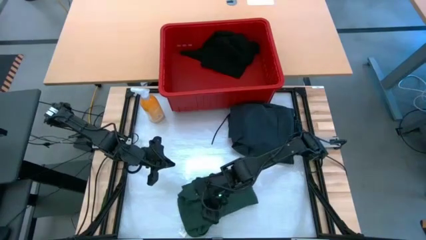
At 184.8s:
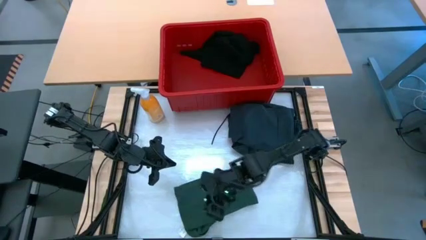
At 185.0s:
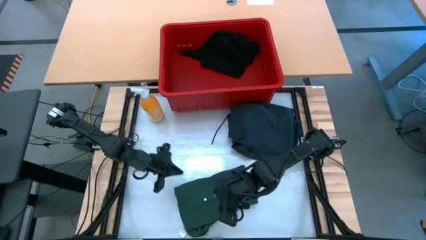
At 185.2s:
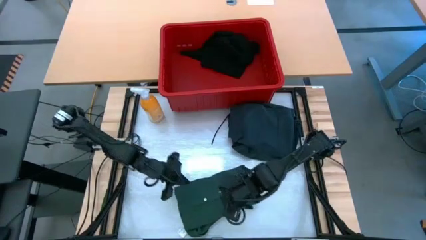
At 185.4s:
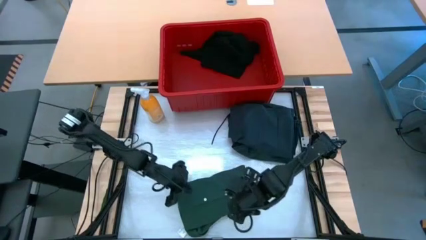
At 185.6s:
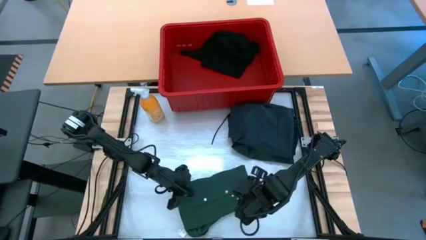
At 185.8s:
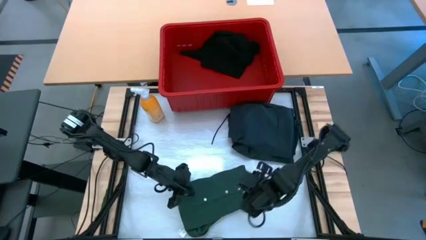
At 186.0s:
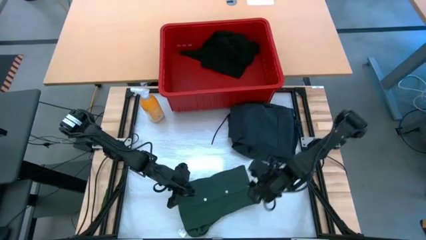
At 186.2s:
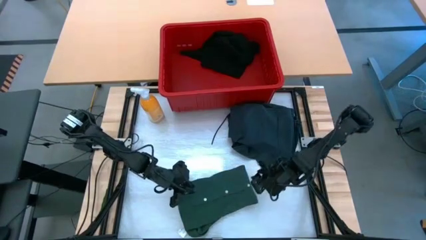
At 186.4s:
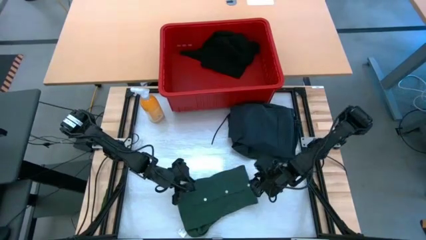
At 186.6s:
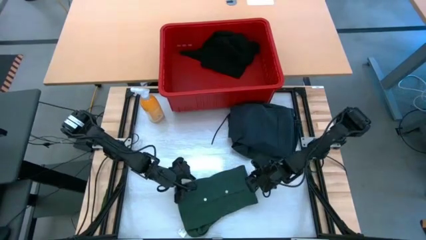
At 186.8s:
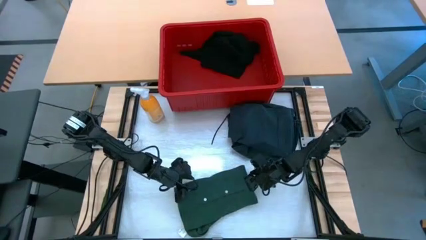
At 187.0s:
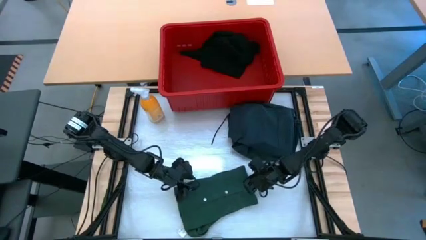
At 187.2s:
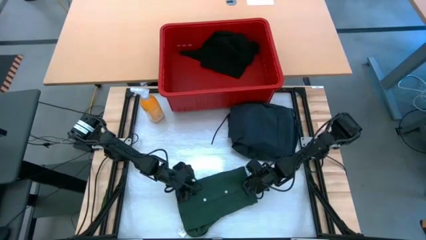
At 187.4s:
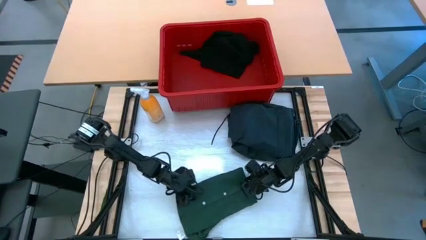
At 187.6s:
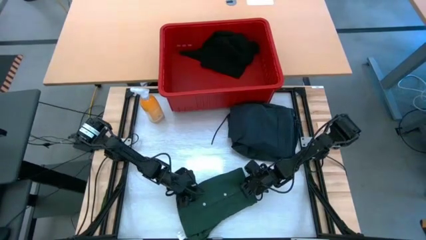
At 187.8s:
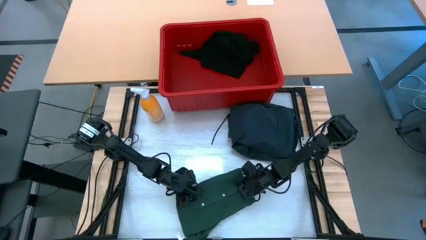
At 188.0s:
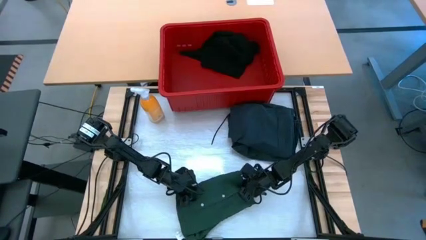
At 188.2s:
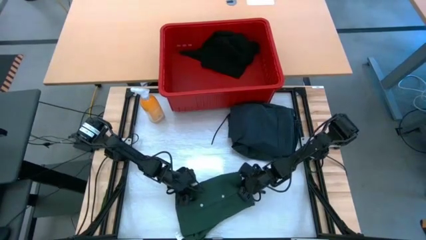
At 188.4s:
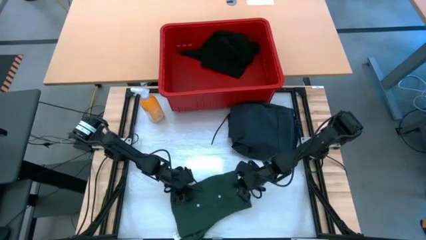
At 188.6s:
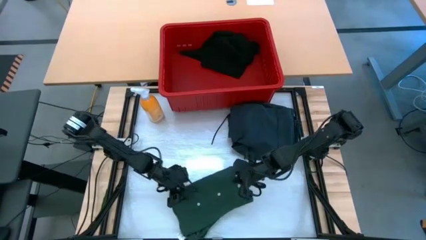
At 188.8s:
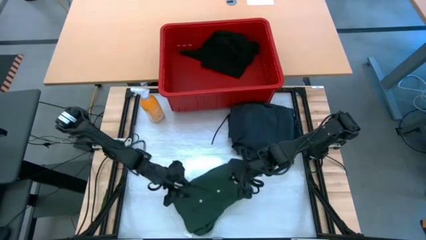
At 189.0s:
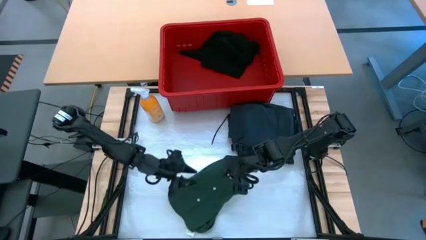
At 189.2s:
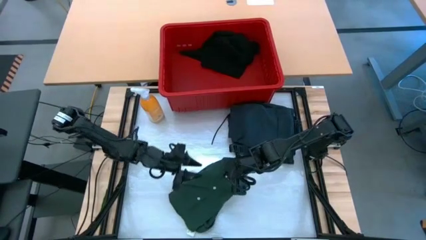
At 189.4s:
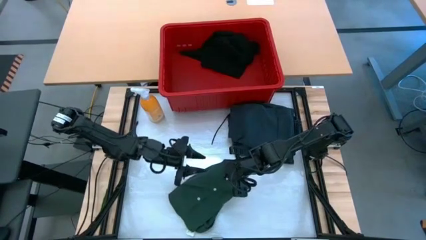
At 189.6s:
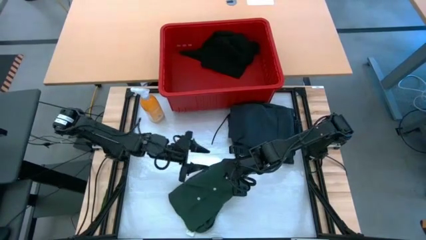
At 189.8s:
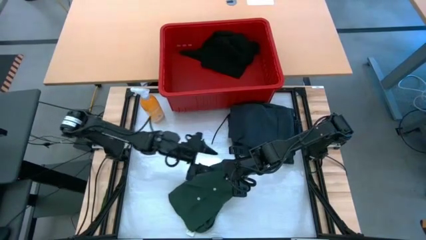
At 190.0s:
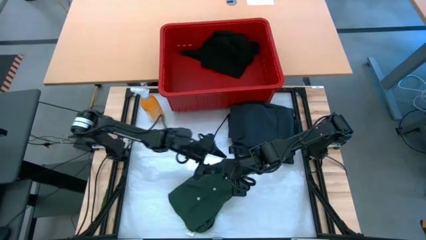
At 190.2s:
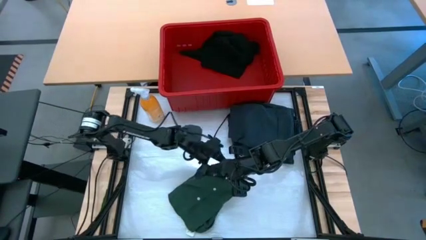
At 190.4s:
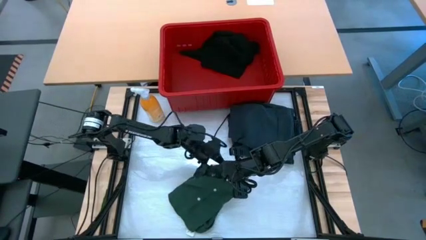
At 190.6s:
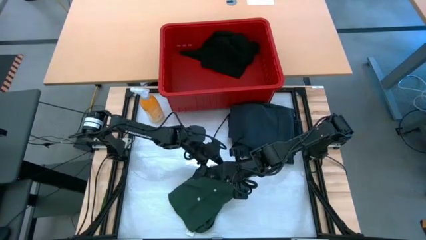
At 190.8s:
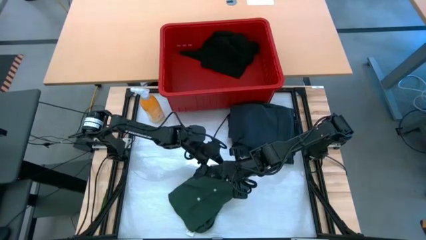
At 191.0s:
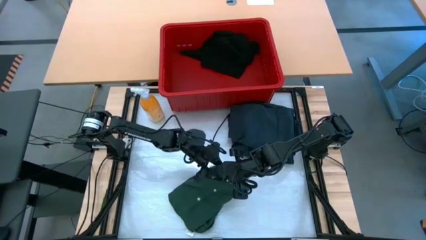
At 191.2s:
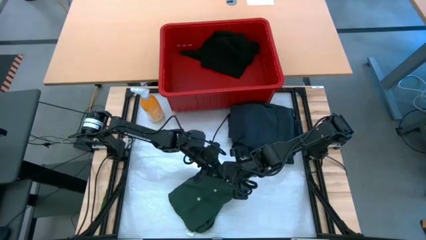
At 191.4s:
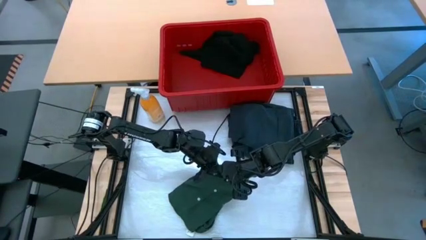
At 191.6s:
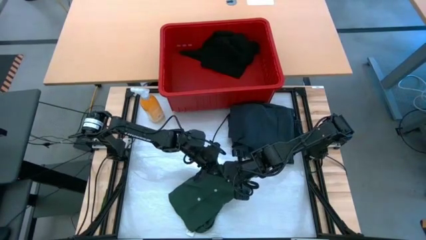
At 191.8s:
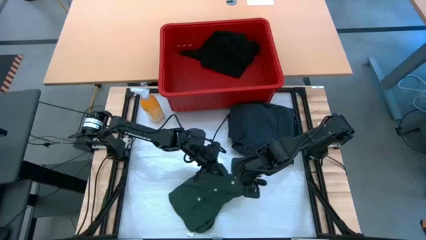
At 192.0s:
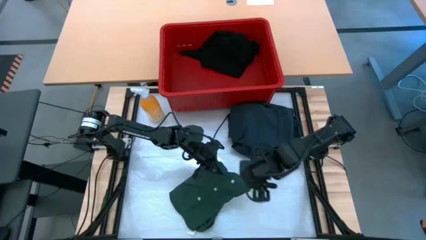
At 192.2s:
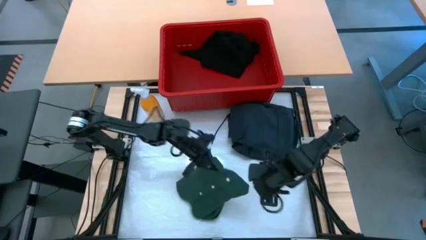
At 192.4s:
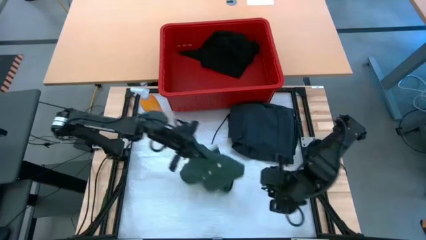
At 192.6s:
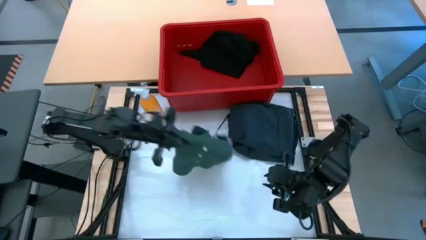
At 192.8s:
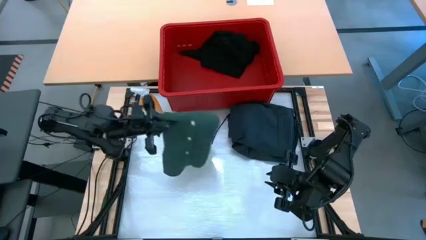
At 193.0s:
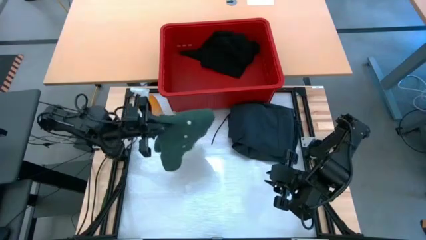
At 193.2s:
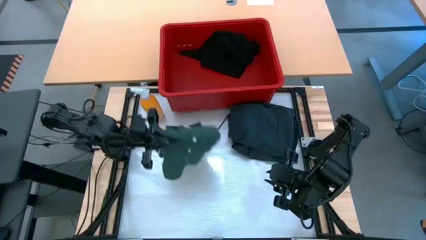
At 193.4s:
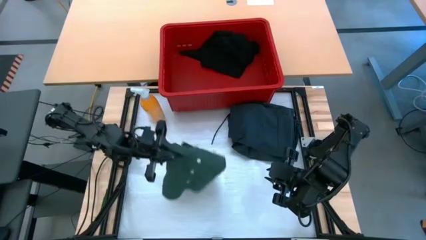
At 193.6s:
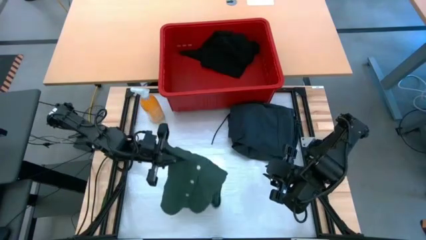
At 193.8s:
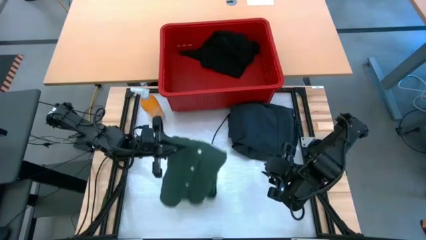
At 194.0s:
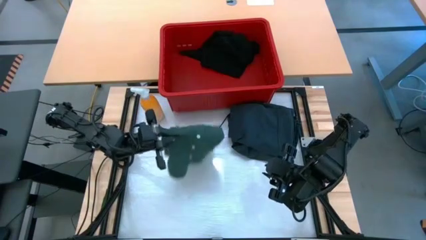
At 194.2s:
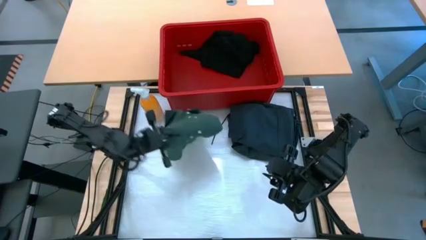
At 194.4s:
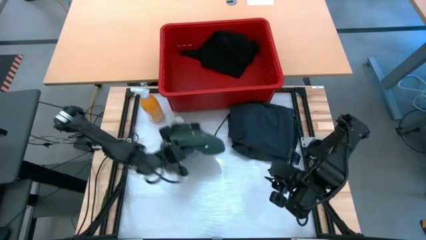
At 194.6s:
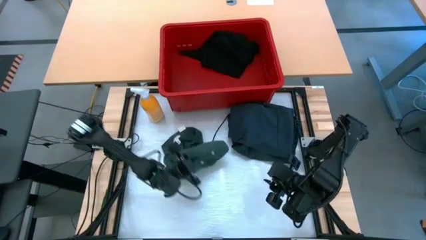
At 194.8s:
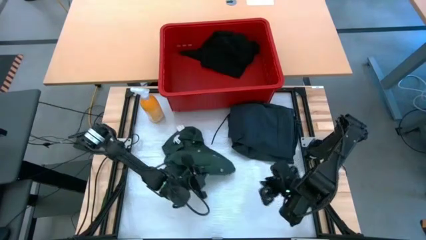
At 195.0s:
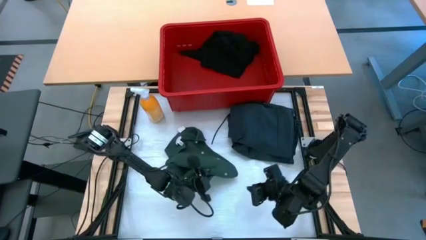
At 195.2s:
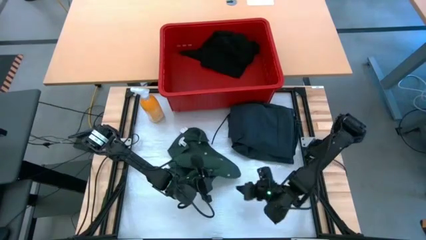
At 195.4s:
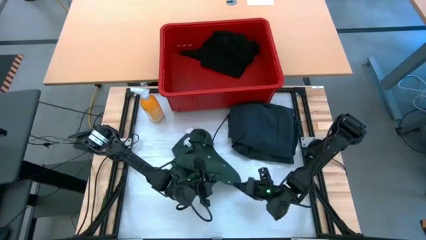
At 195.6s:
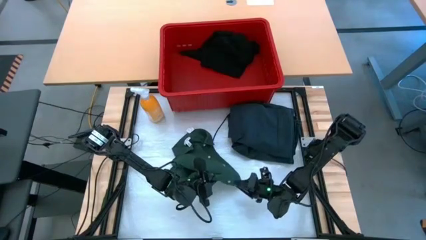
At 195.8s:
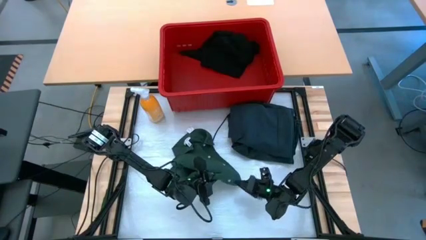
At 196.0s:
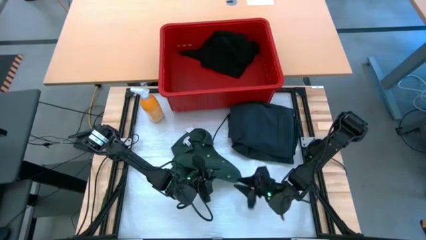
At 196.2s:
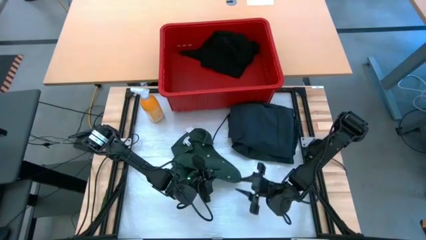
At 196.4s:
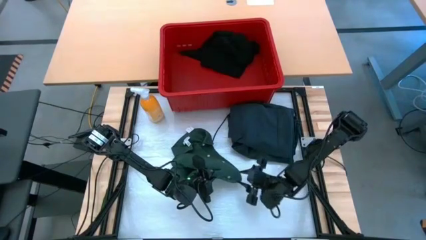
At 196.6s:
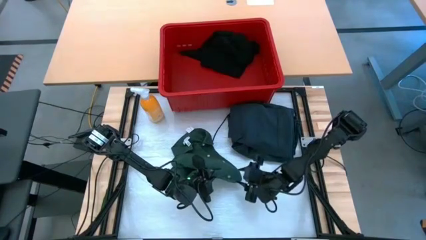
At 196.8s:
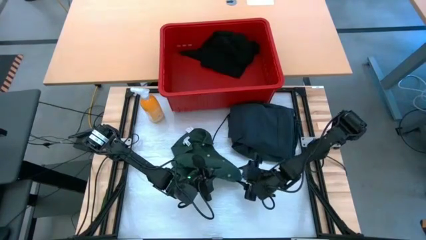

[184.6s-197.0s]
Task: Fold laundry
Stack the green shirt on top of the black shorts on the table

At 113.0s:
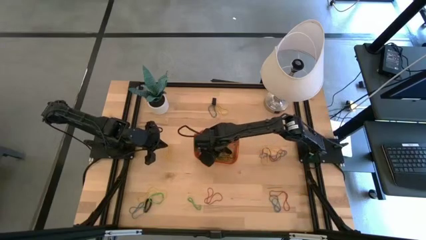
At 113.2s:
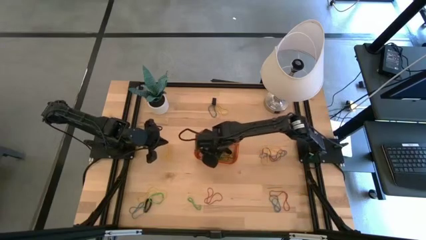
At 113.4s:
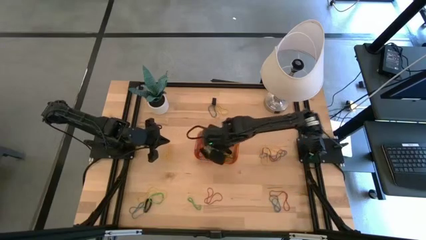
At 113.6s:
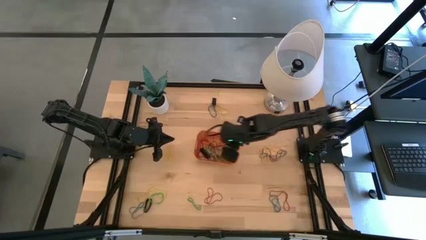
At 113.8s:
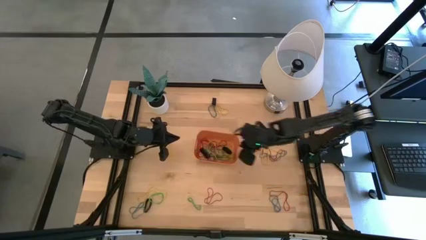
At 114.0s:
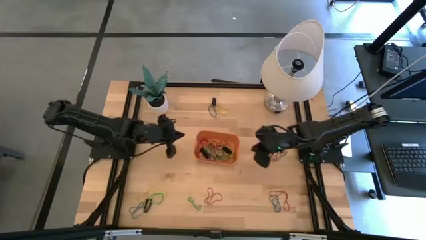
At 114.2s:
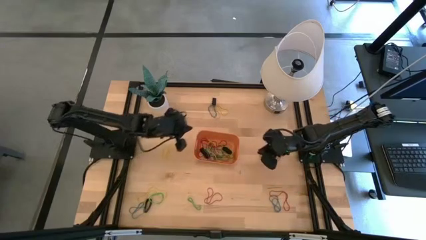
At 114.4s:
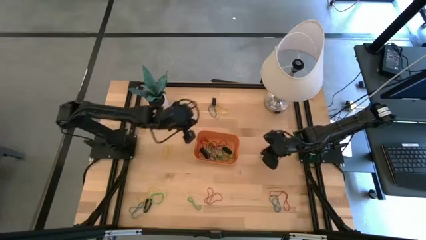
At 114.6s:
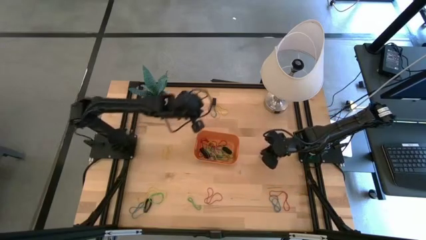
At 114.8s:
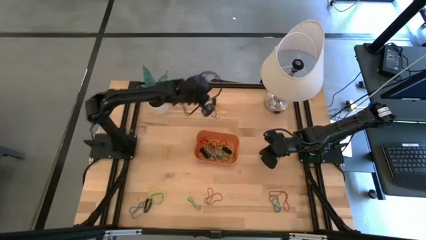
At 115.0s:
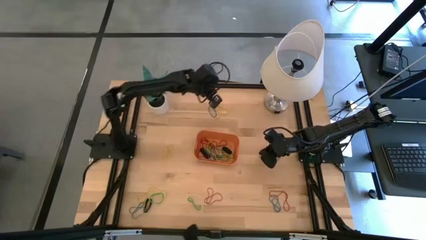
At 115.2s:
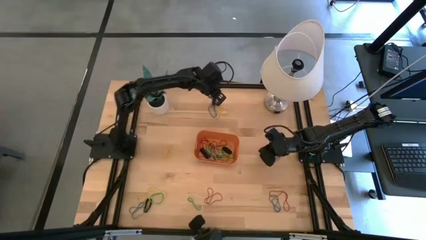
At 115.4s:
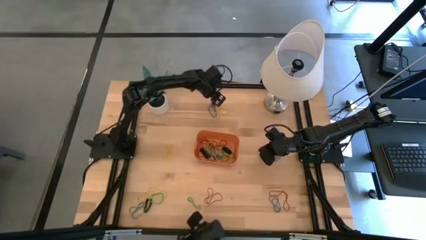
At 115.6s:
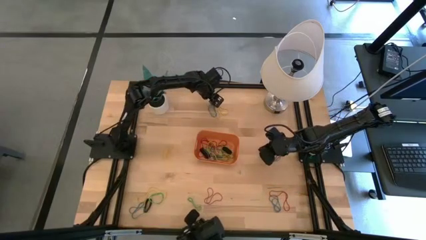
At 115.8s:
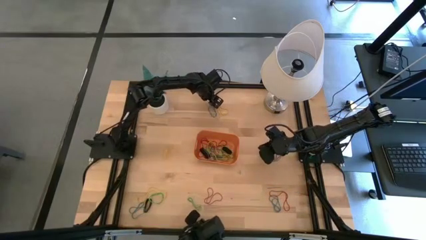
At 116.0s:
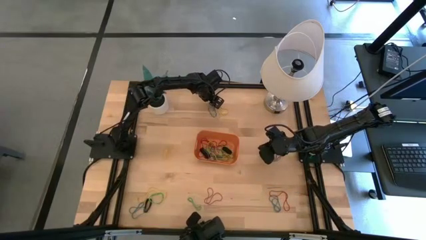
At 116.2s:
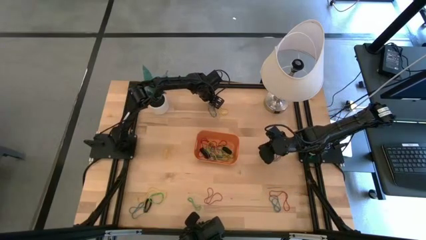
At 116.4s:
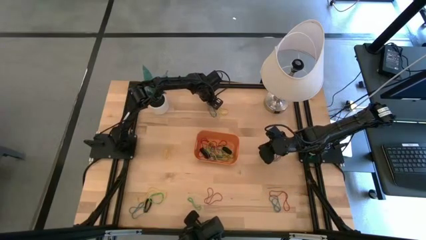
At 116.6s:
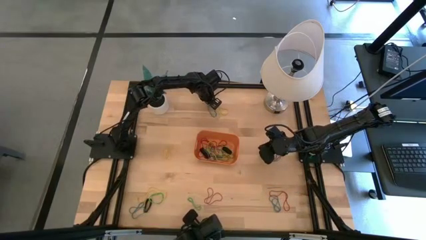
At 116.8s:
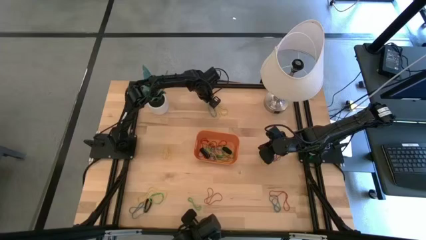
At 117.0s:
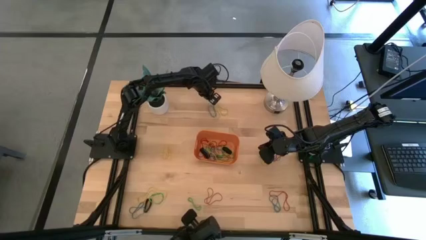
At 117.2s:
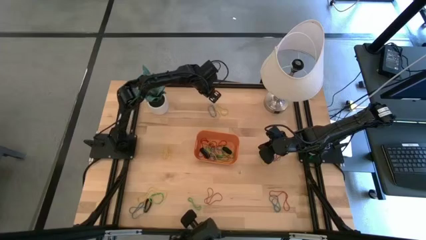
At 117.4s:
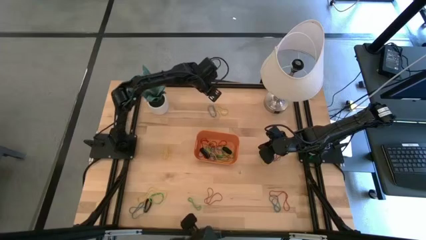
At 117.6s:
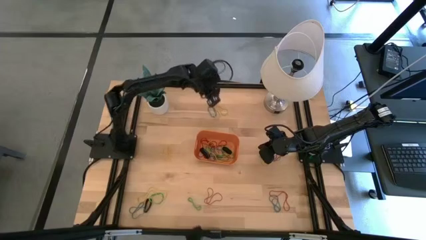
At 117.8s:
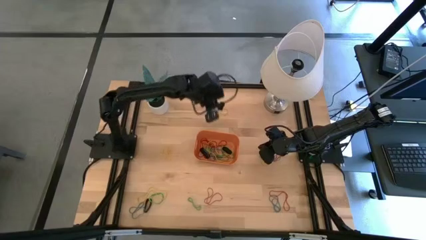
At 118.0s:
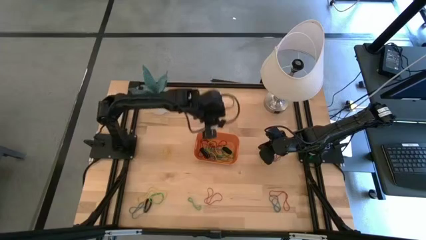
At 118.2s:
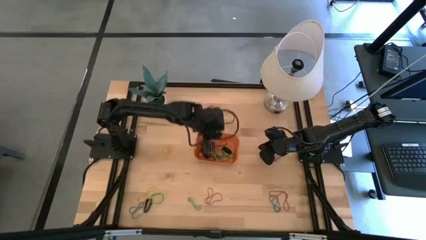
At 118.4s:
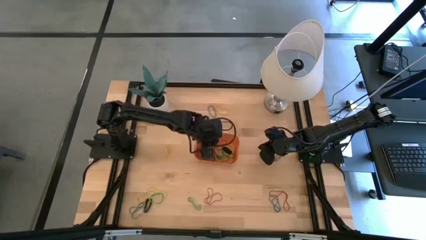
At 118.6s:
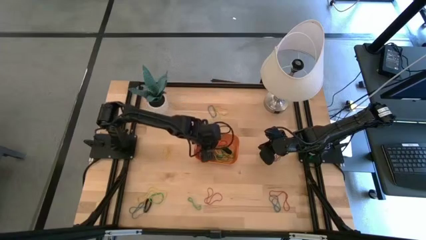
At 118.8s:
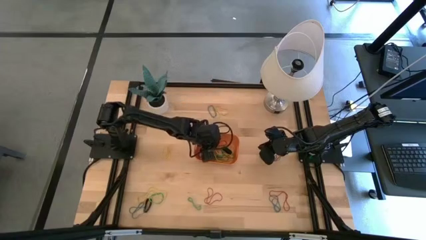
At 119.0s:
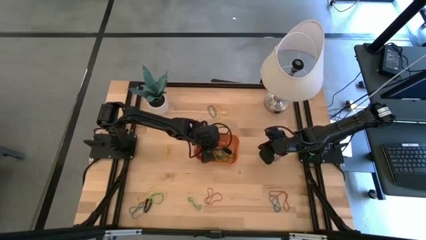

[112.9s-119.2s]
Task: Pick and place rubber bands into bin
Put the black rubber band into the orange bin
